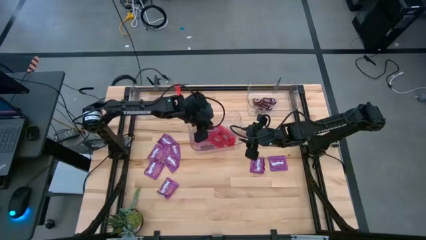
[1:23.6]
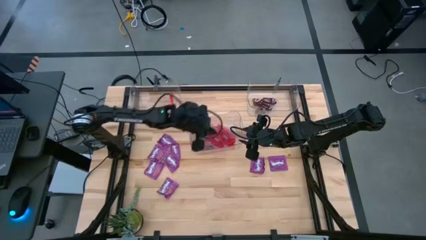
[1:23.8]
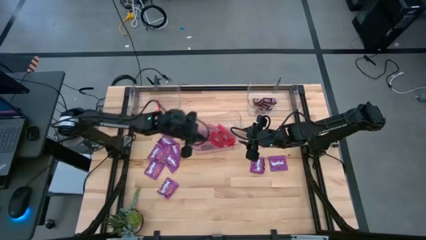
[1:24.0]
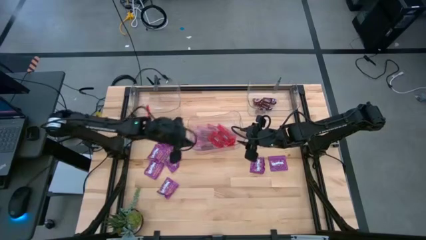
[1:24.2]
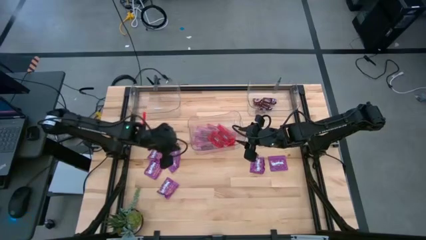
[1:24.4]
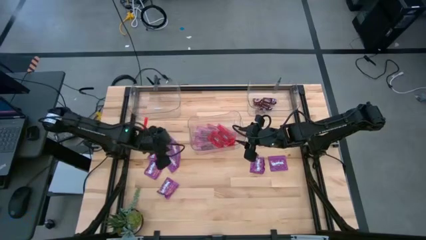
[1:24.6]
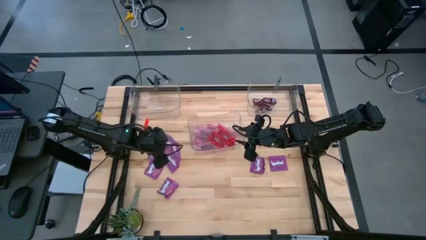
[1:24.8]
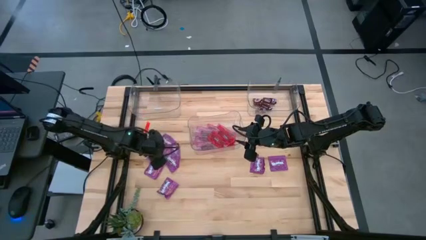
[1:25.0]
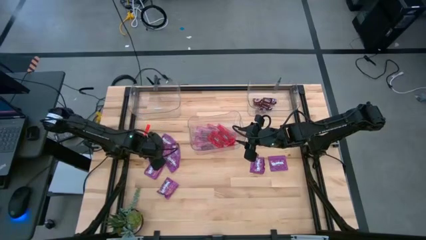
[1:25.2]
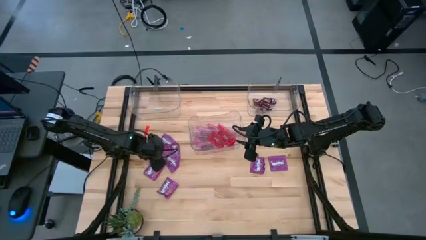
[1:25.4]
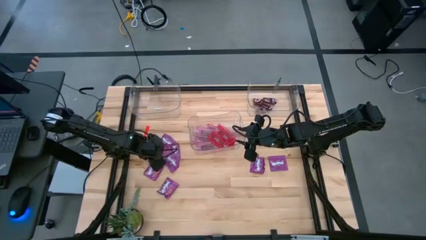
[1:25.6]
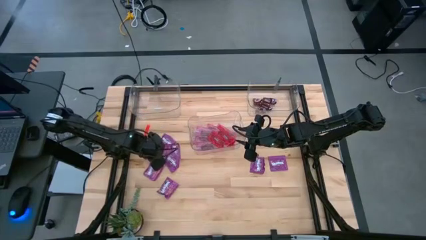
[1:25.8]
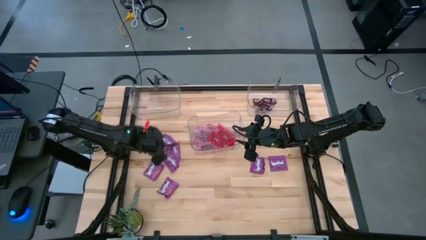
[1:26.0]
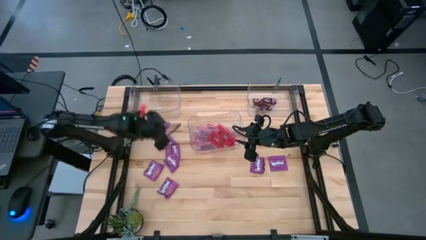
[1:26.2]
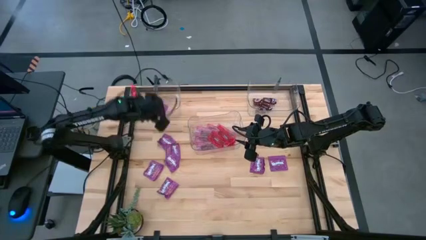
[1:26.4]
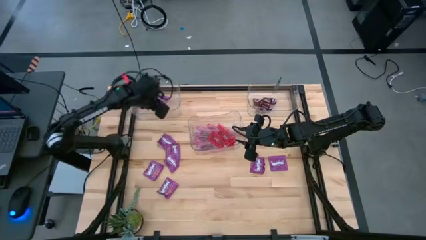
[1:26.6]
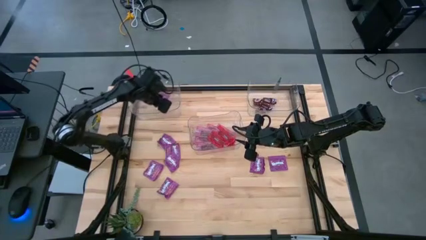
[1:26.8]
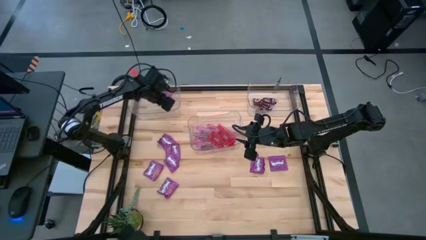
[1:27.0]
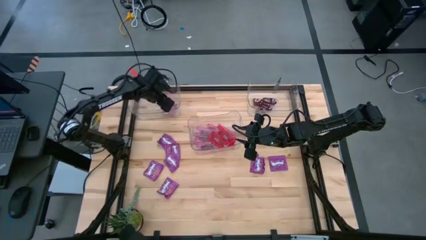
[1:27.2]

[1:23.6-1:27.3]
Task: Sort candy
Put the violet candy pack into the top left transparent bin

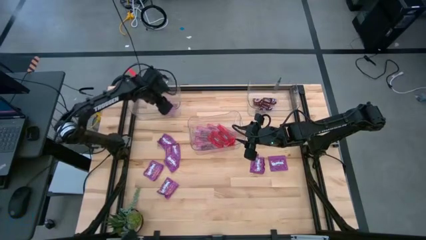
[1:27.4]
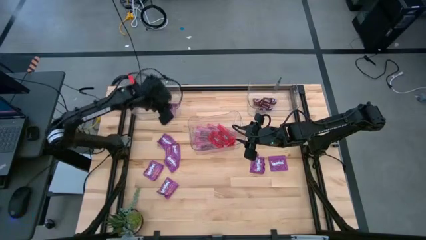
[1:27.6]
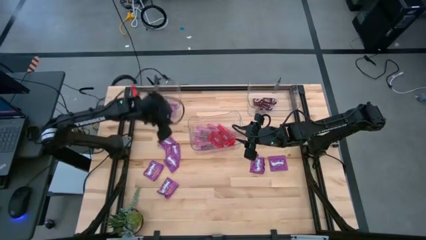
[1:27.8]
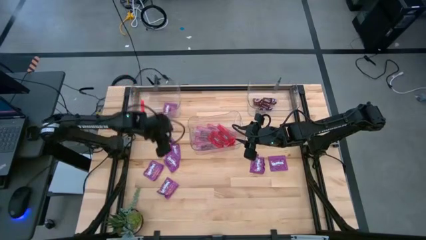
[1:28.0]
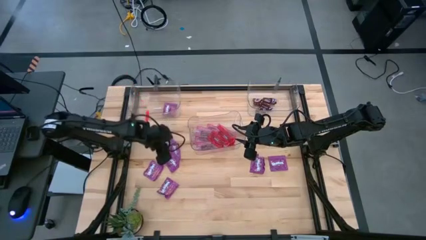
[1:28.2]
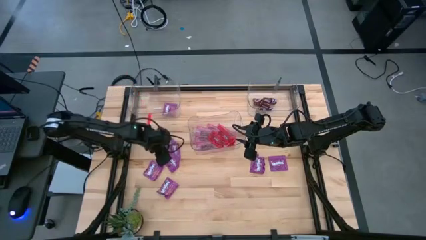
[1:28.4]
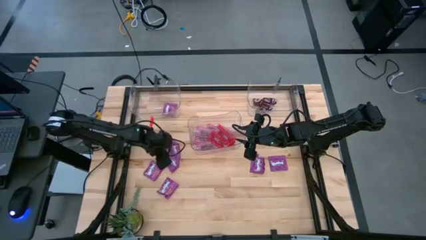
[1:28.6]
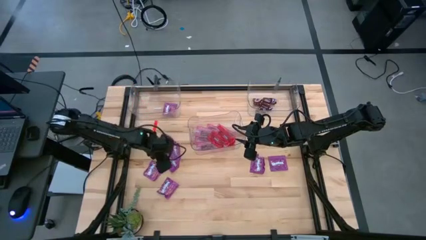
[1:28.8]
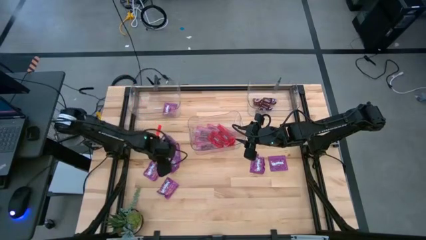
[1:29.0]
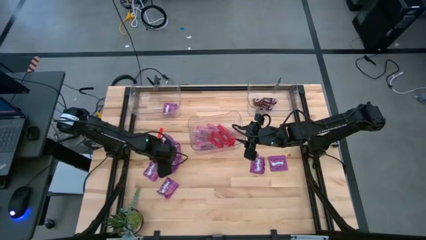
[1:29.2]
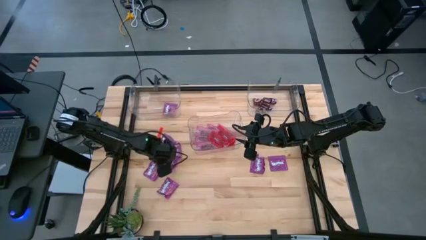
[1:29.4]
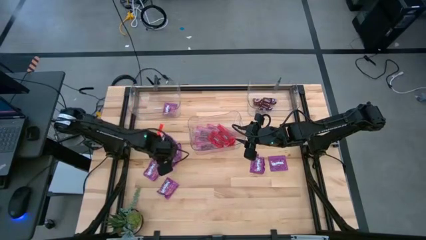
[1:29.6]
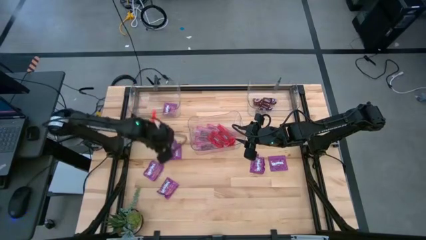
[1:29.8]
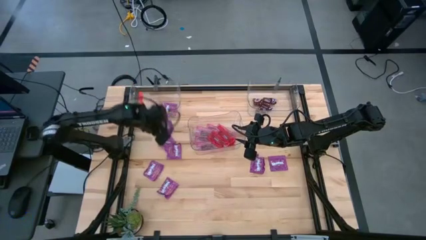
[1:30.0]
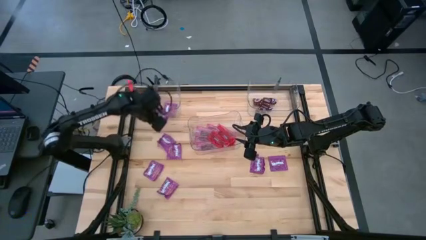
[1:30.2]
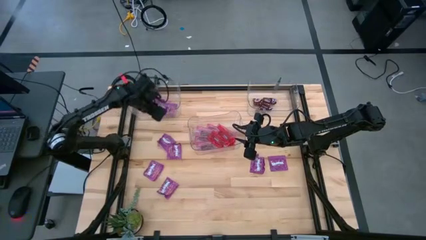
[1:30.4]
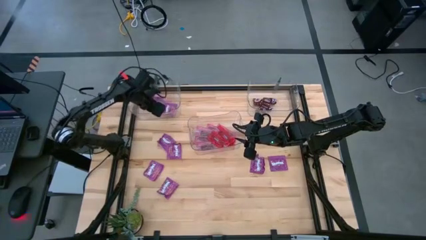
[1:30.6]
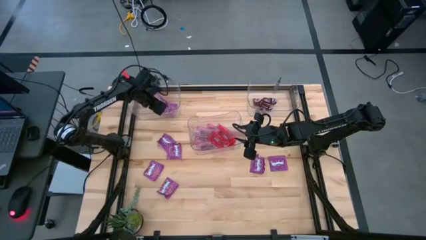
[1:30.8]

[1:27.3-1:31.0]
Put the violet candy pack into the top left transparent bin

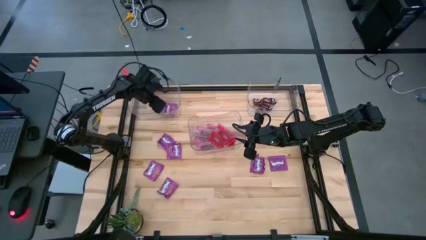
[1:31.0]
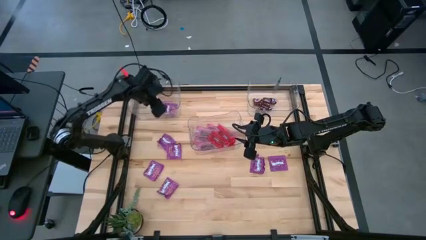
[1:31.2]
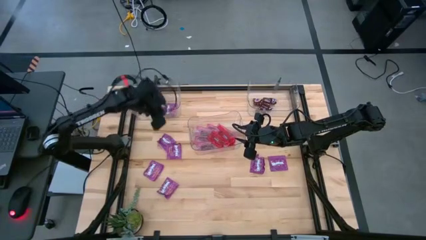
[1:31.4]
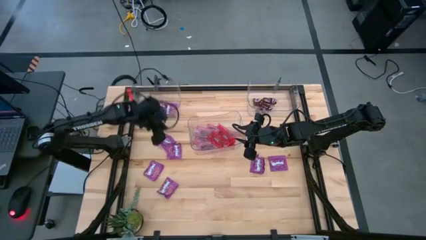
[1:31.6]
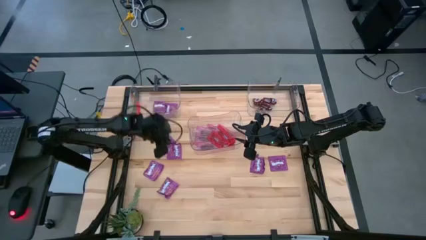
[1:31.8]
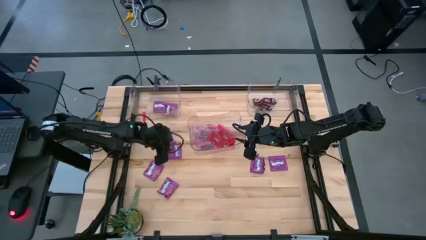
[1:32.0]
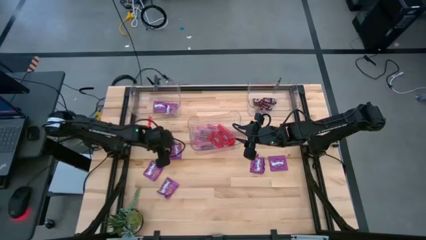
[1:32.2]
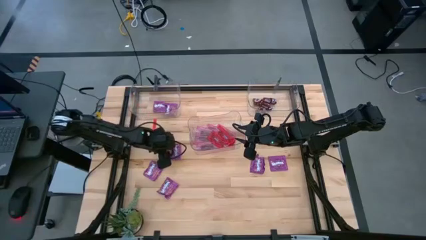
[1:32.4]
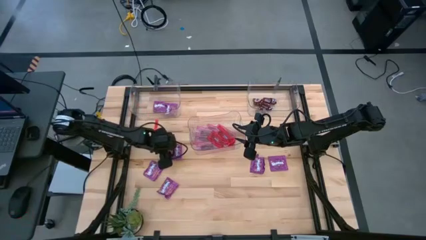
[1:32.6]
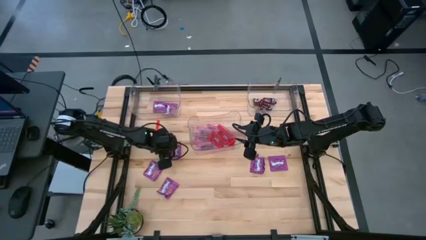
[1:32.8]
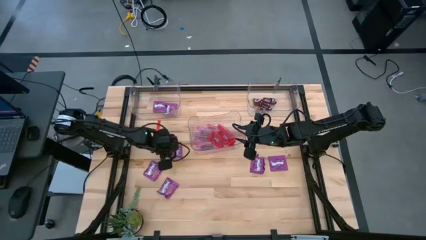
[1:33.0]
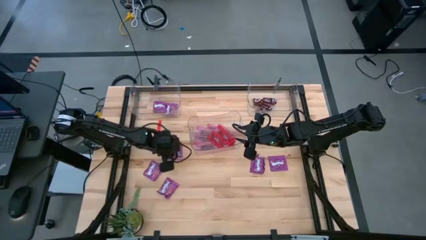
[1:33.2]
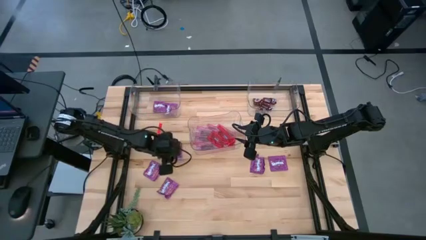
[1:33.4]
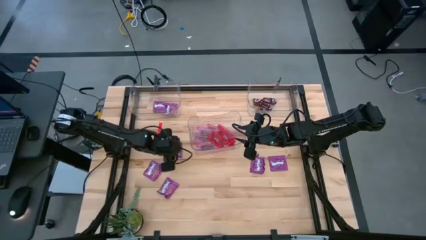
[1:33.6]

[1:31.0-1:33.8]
Put the violet candy pack into the top left transparent bin

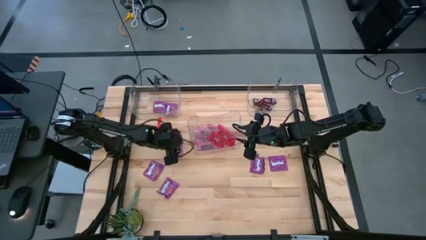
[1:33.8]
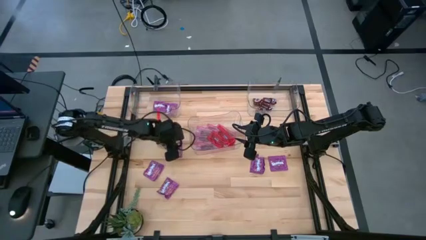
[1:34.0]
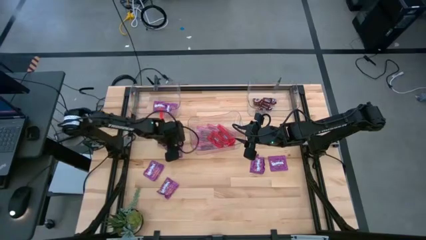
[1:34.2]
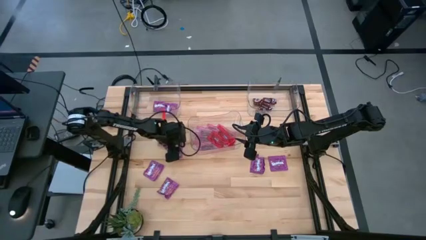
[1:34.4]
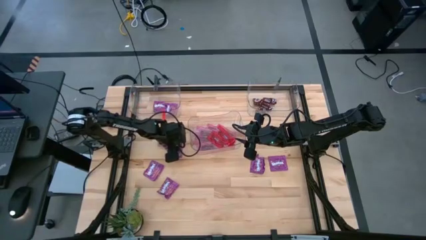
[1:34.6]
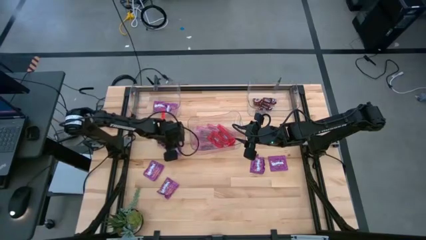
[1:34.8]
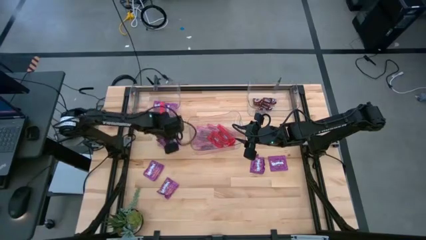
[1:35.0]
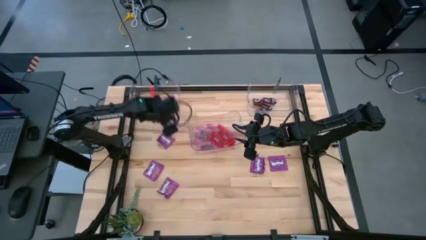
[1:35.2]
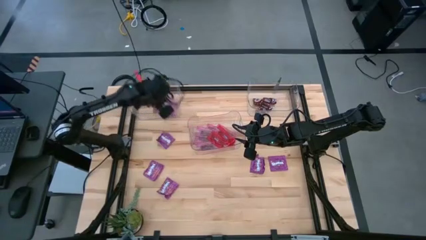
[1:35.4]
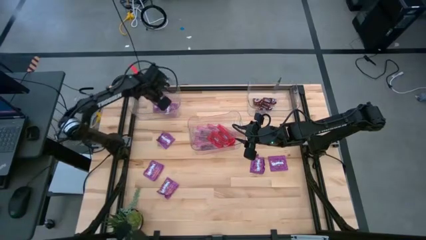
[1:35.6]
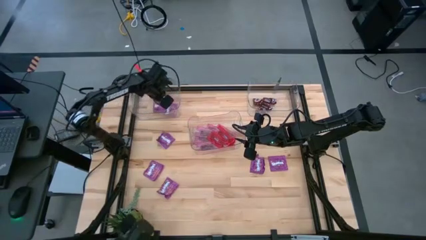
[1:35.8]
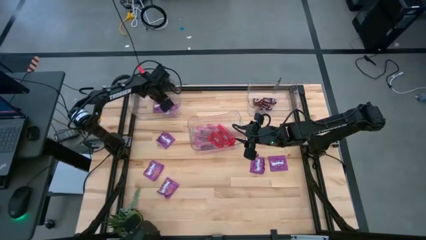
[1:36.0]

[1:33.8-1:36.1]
Put the violet candy pack into the top left transparent bin

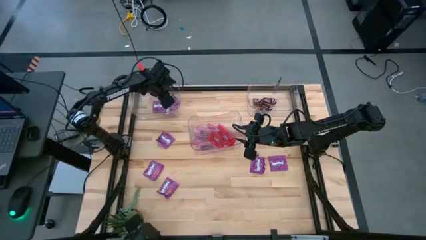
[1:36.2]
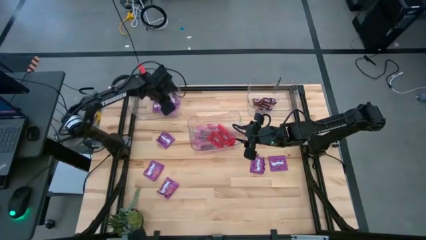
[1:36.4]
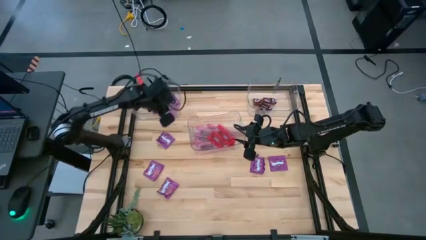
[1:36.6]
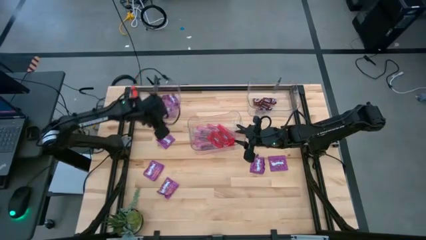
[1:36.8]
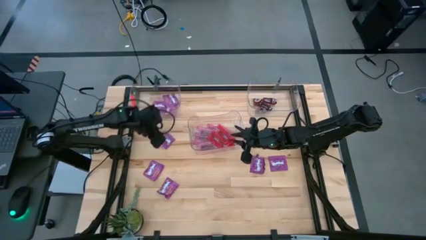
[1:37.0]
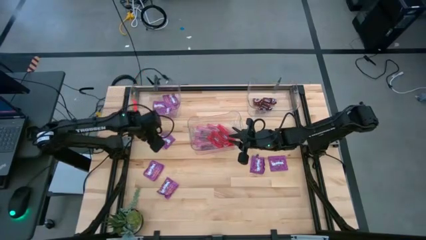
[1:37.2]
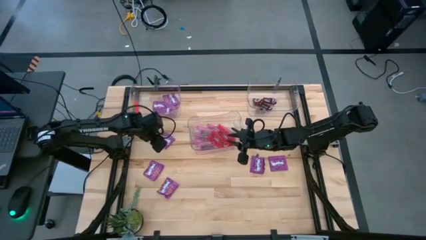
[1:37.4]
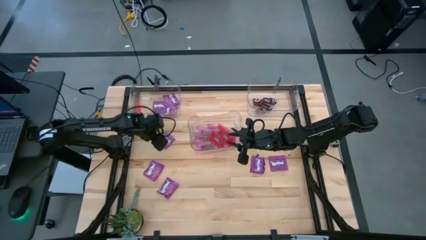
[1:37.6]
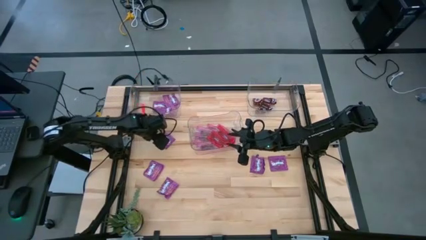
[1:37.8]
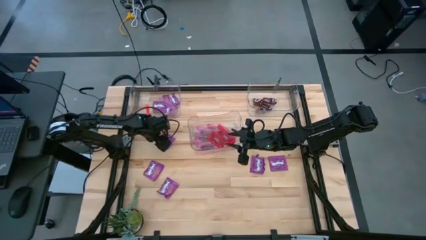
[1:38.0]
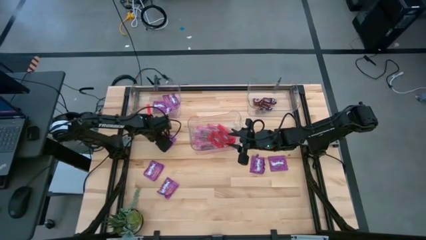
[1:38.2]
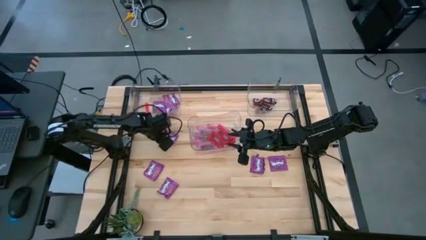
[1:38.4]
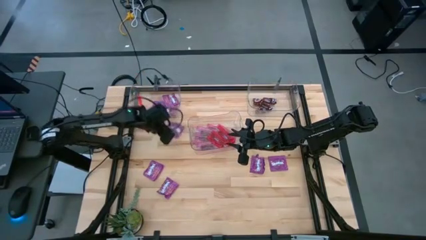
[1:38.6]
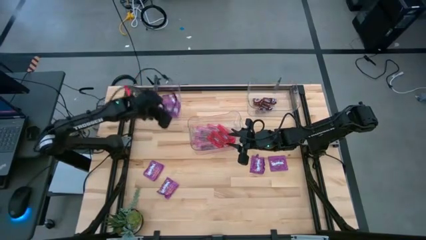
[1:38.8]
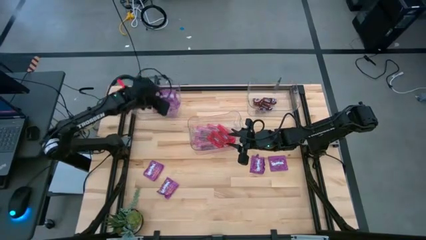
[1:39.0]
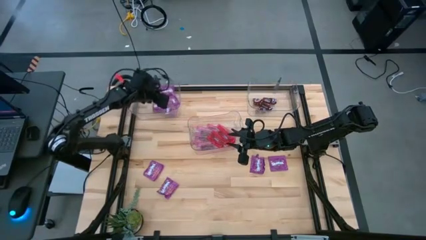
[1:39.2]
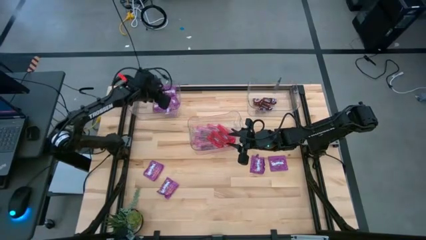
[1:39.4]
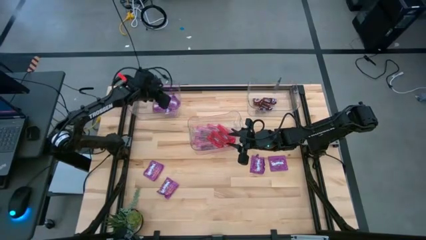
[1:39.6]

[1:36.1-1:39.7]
Put the violet candy pack into the top left transparent bin
